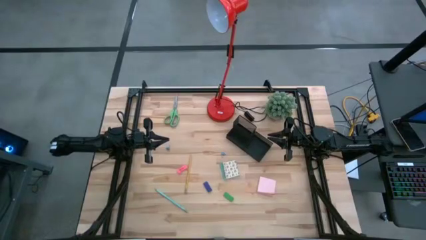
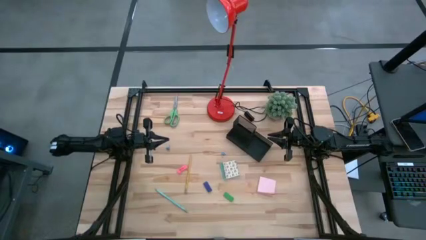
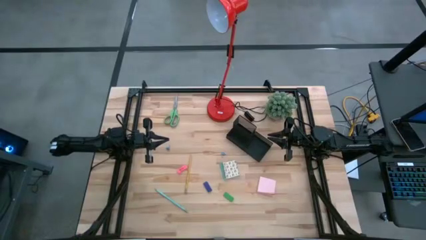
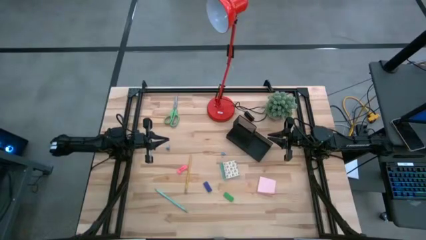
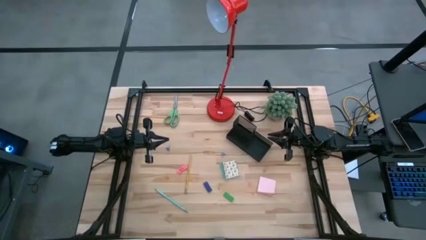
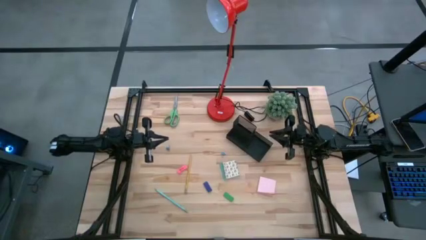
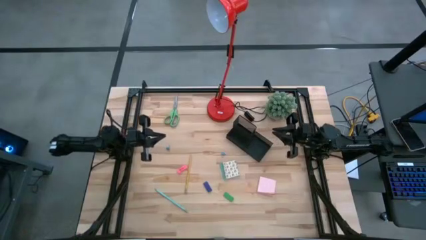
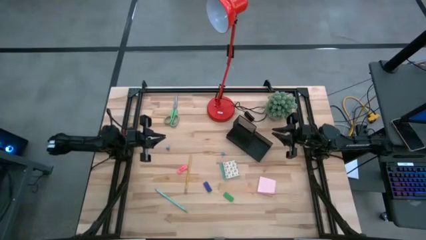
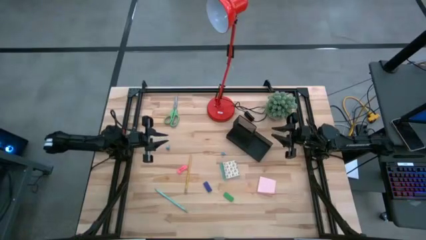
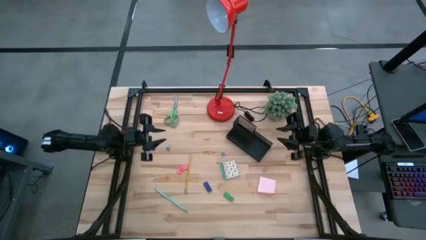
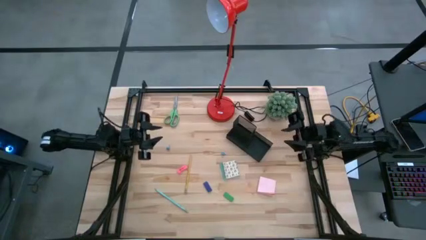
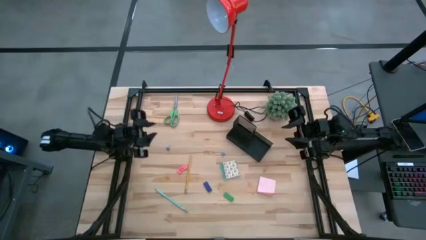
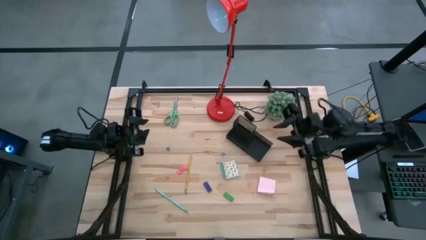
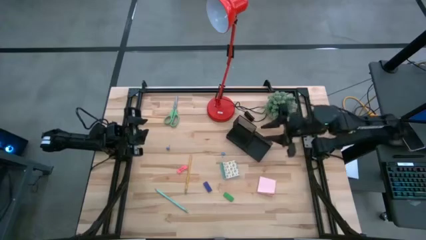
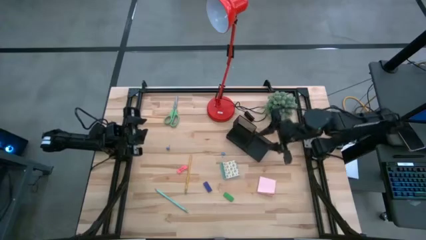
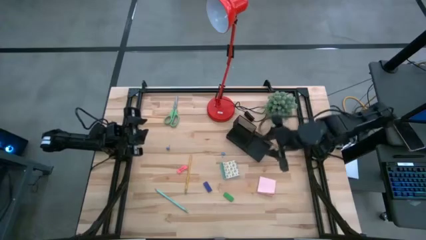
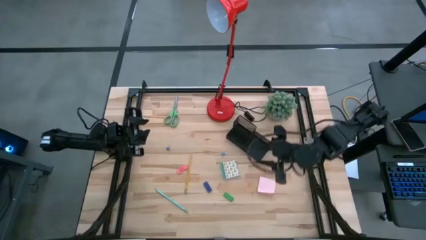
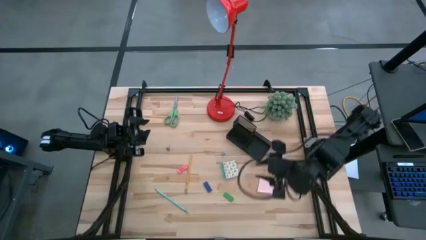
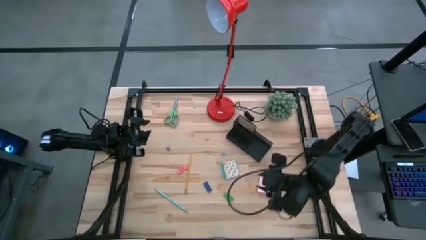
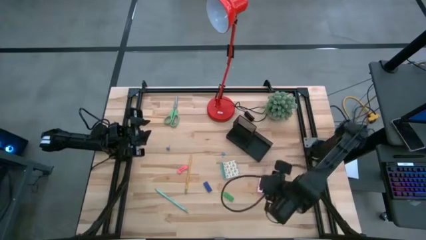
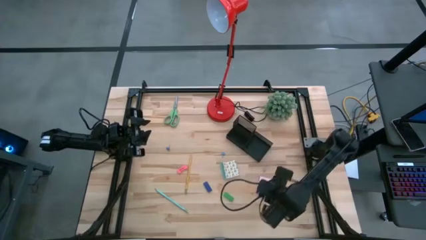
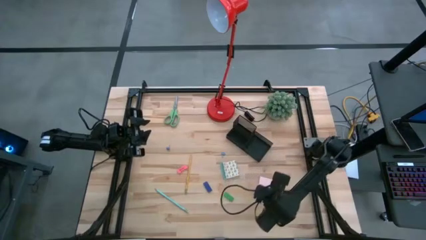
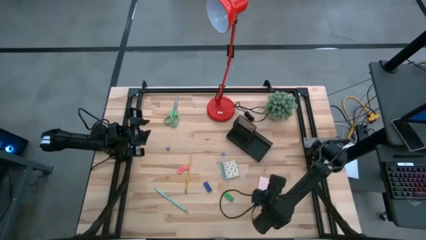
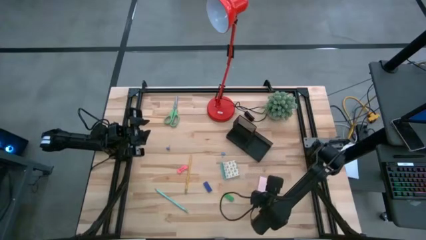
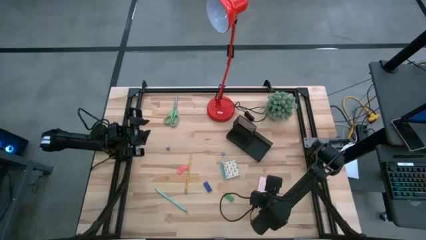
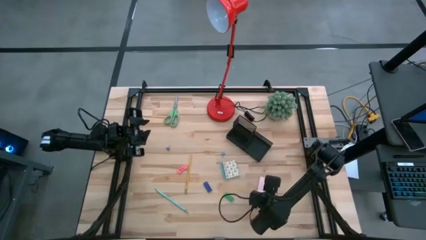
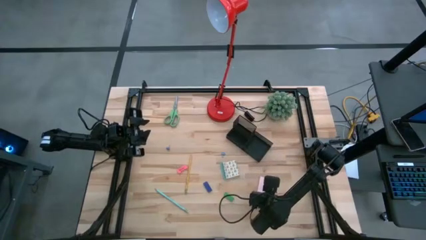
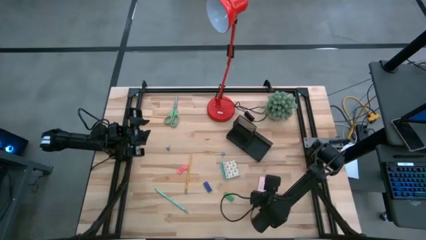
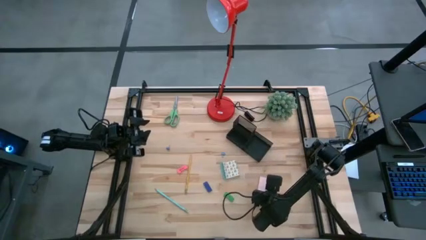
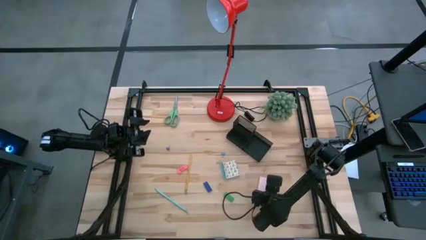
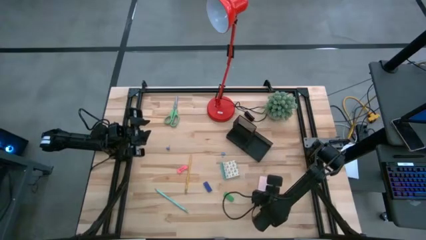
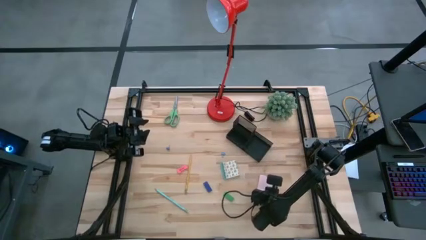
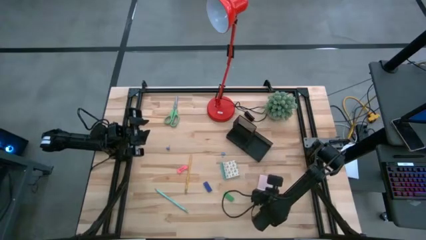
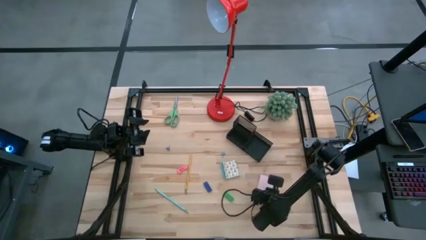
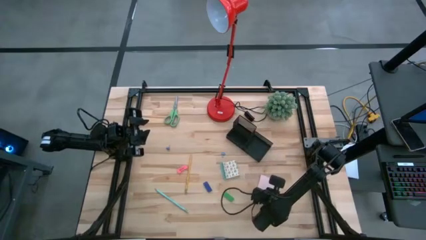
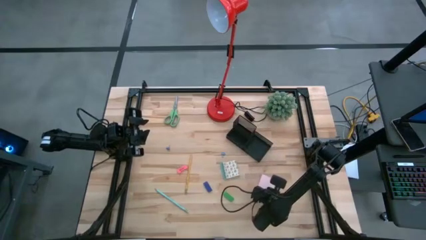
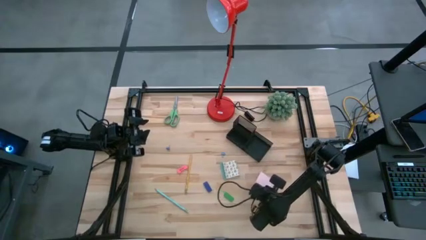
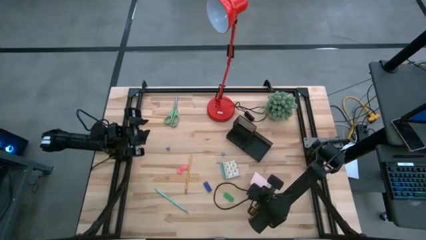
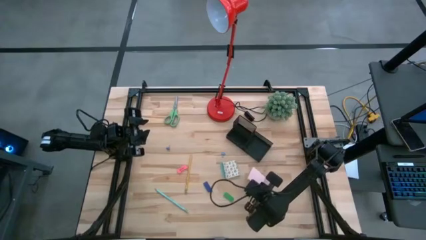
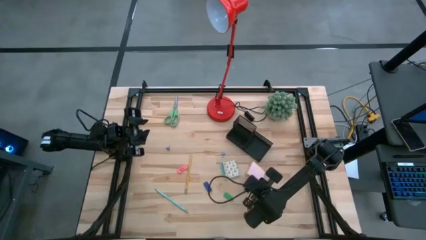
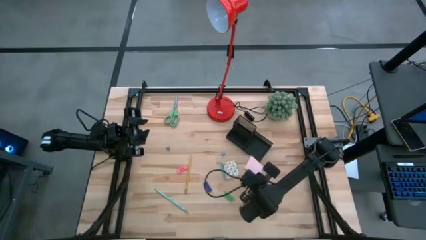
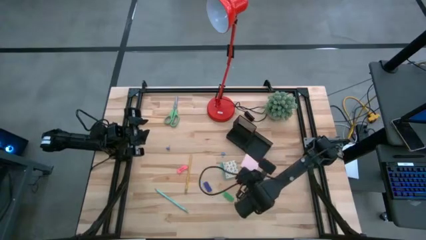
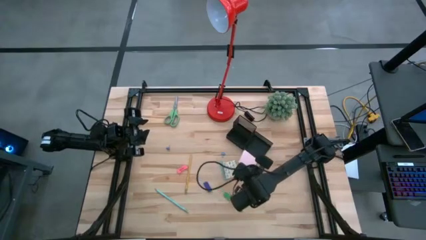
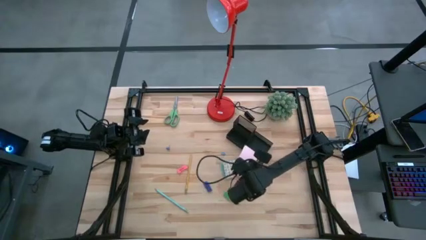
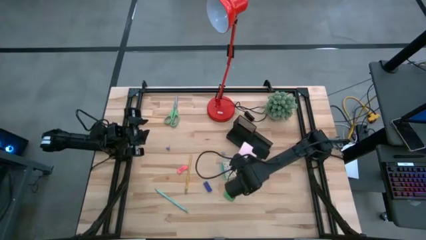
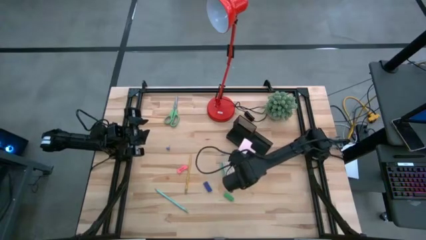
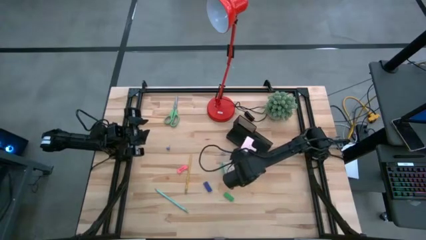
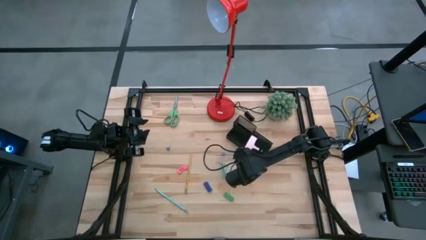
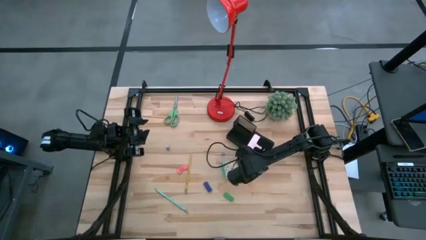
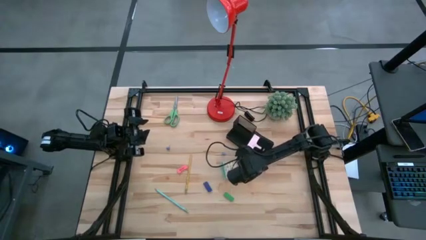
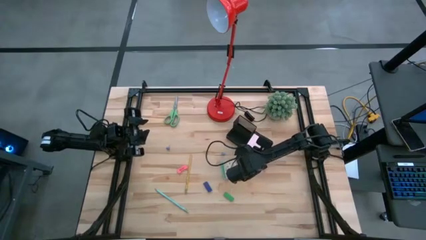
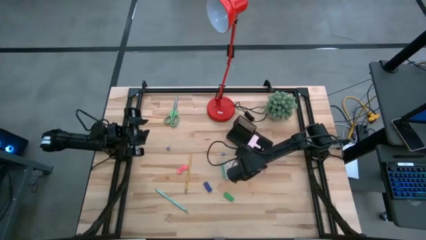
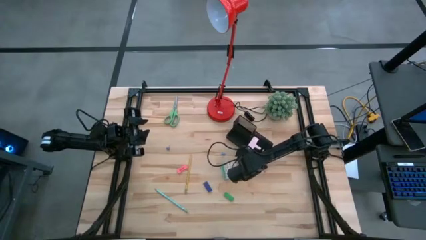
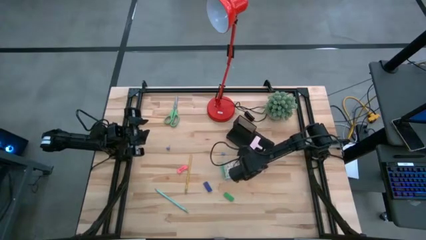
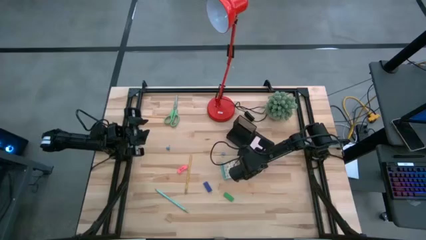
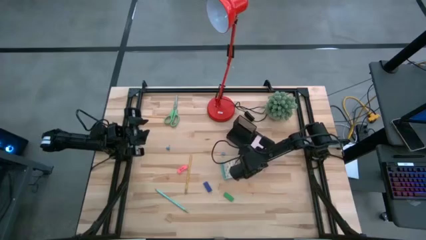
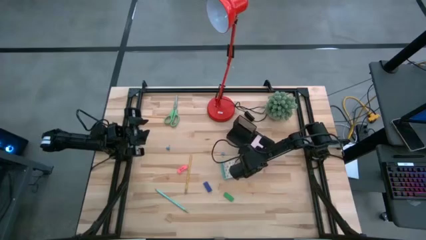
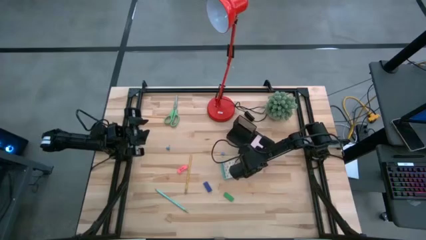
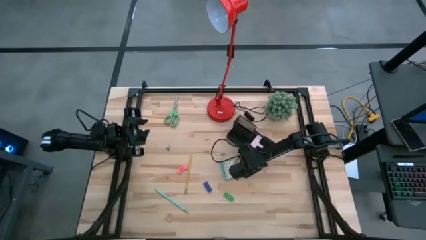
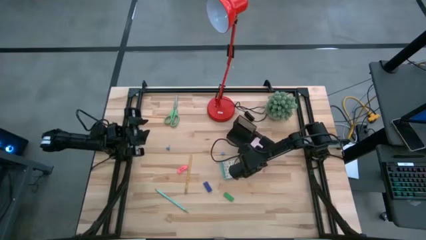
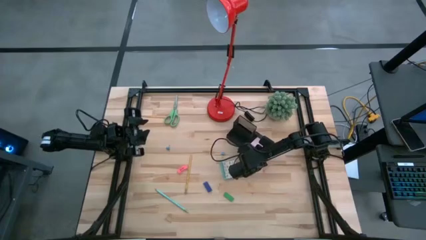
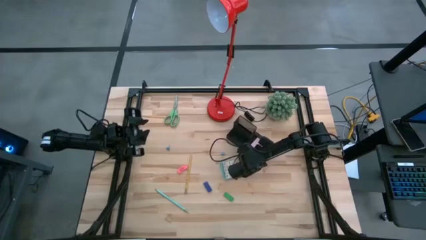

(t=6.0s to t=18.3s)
Task: Pick and place office supplies into organizer
Put the pink sticky note into the desk organizer

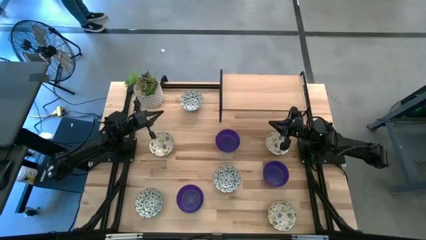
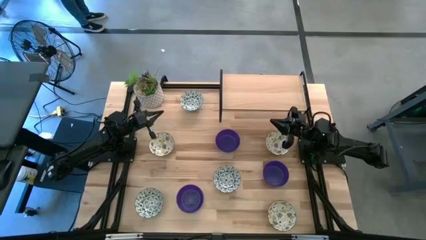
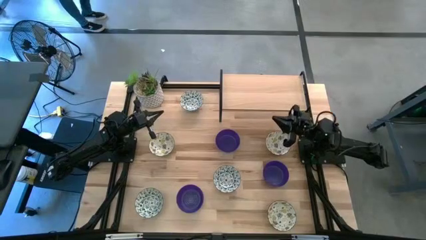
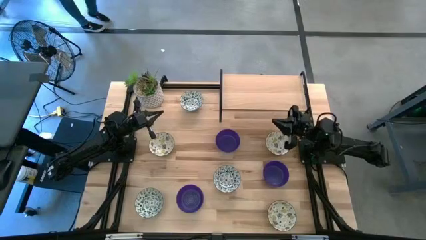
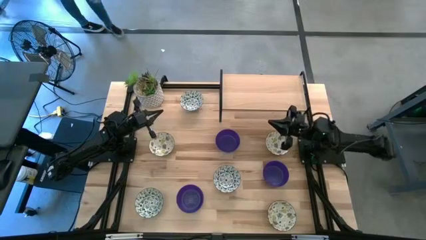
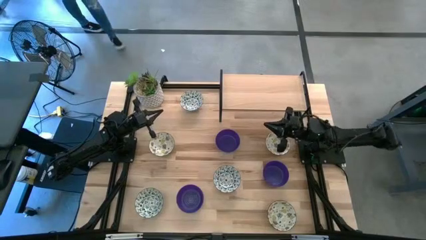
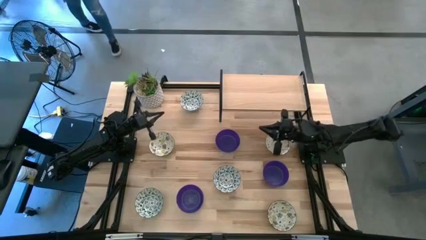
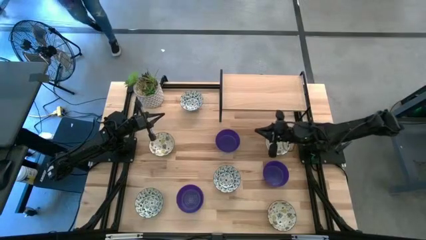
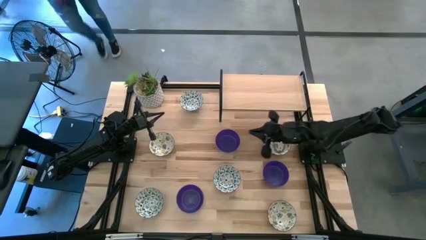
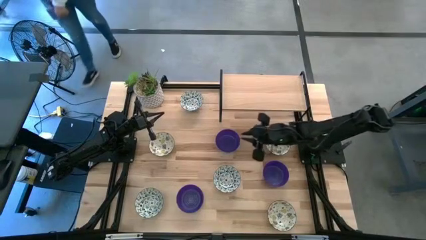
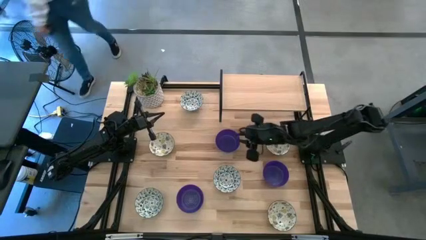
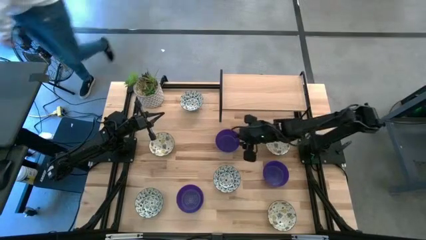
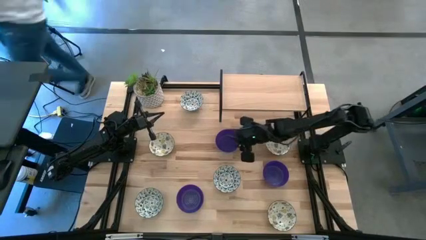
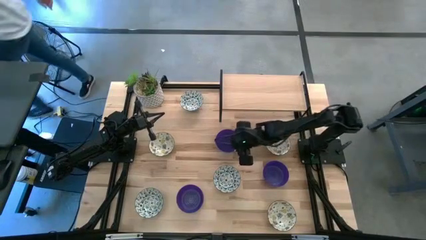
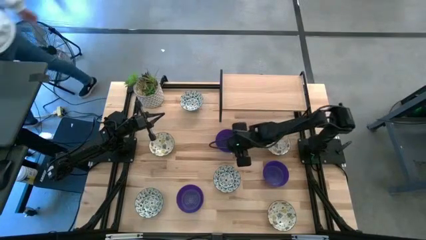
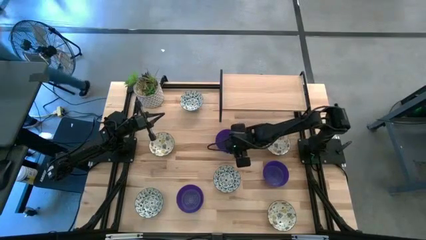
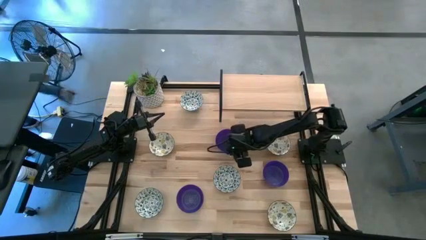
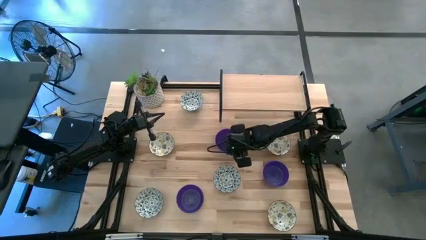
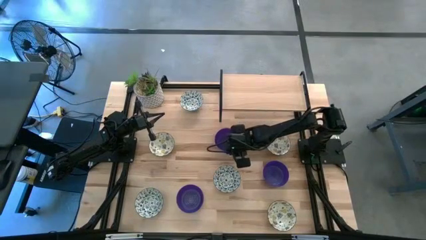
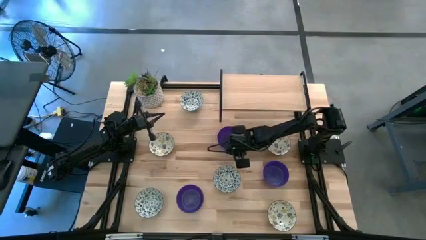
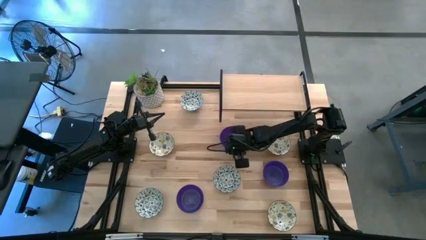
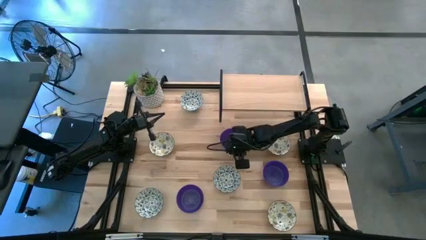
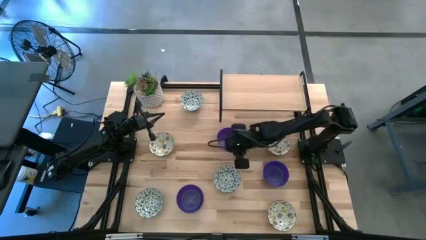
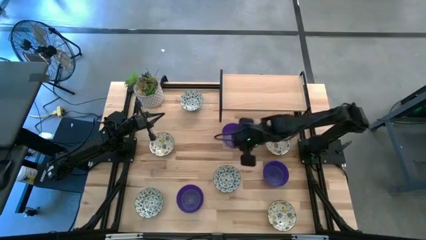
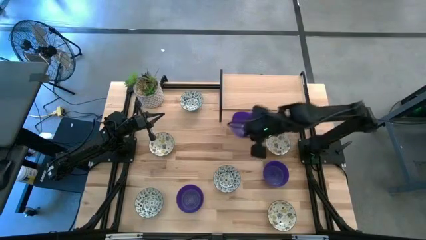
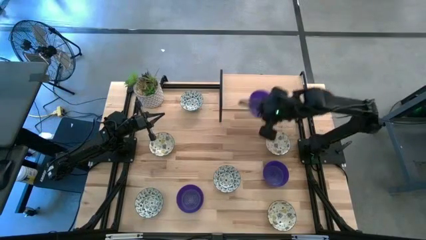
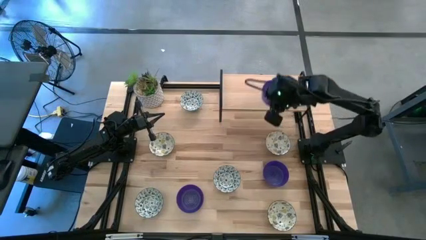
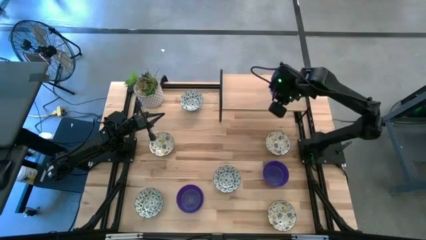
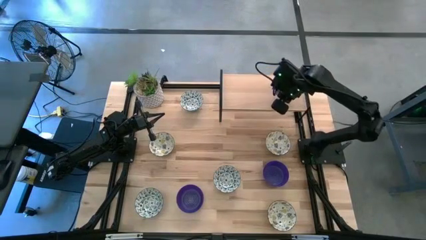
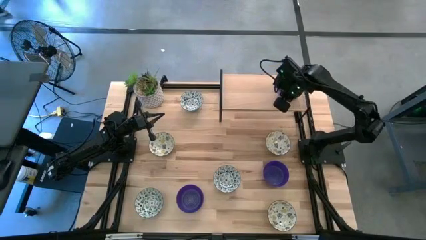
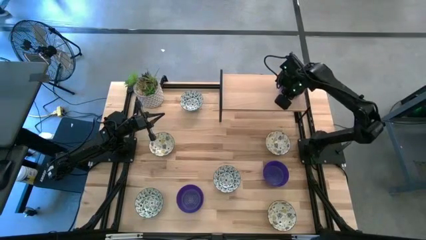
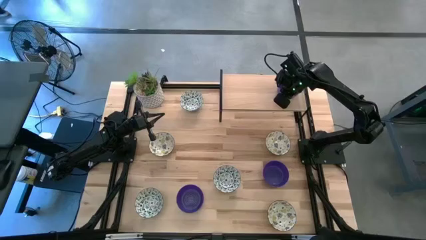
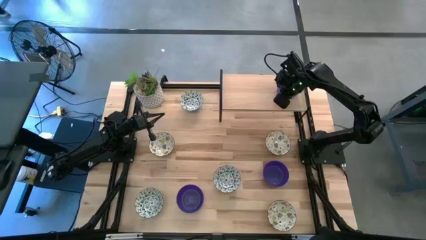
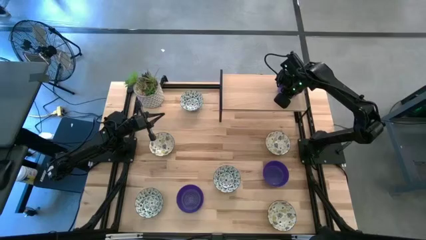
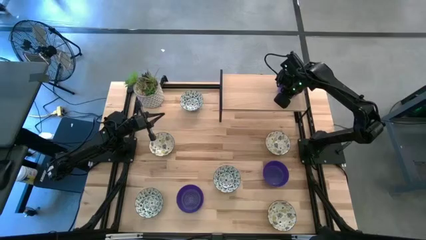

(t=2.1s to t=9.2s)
Task: Pick & Place Mini bowls
Put the top violet bowl on the shelf
